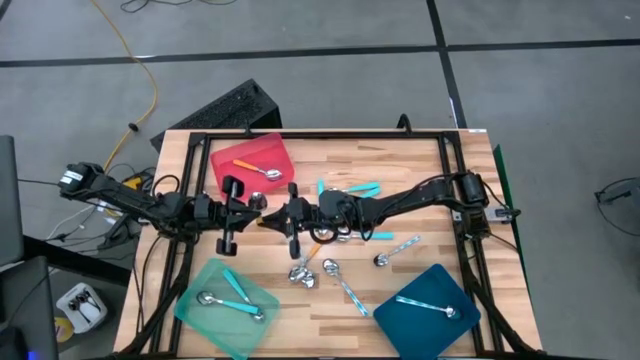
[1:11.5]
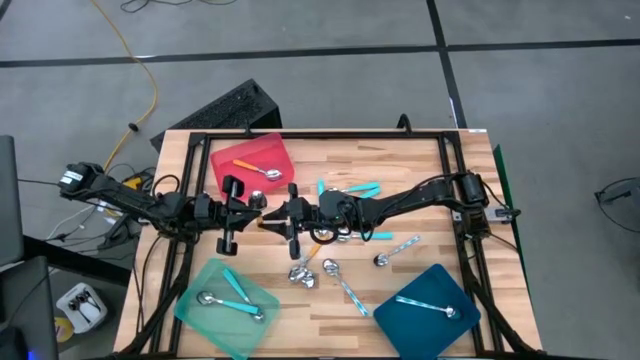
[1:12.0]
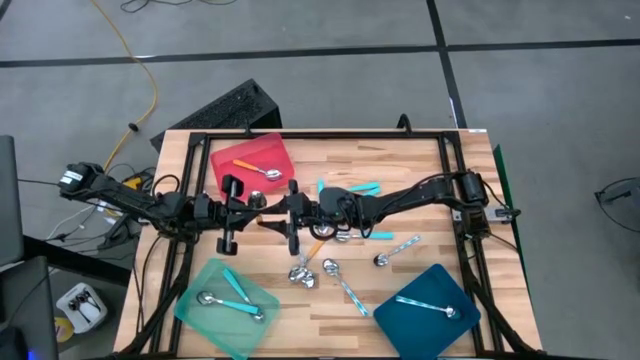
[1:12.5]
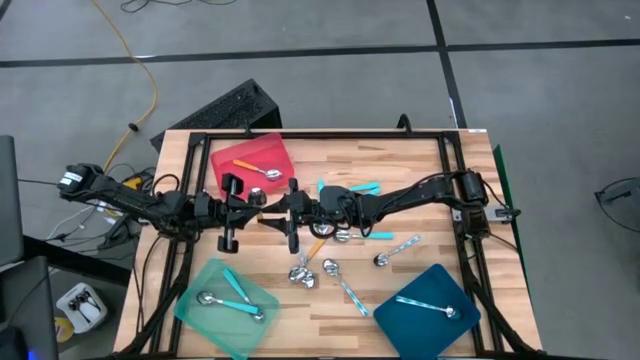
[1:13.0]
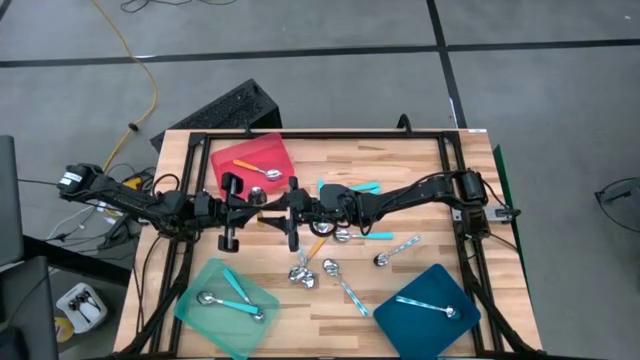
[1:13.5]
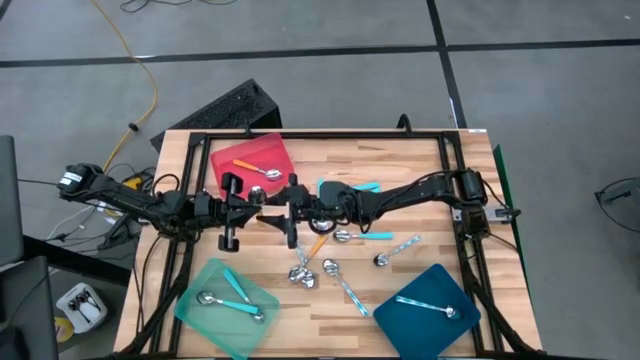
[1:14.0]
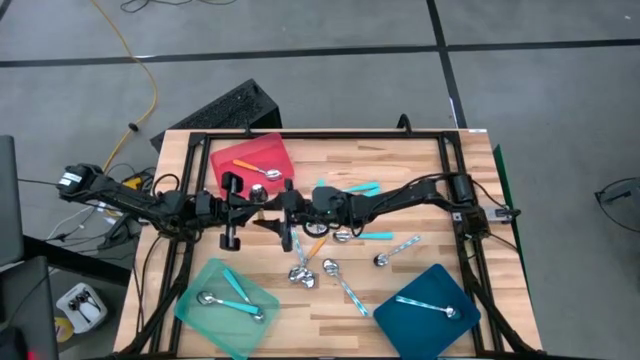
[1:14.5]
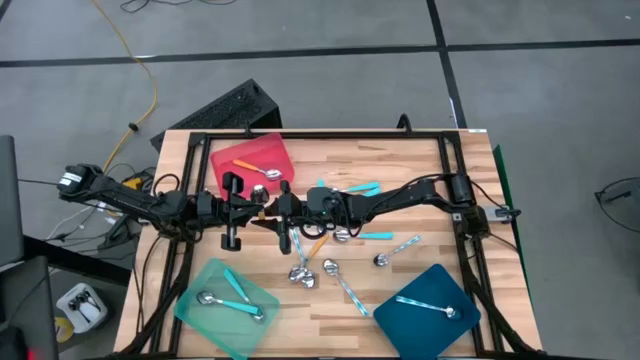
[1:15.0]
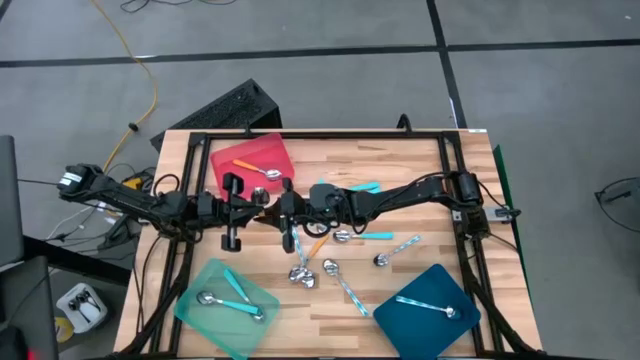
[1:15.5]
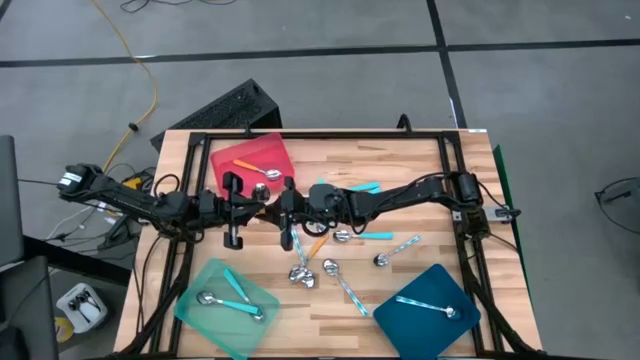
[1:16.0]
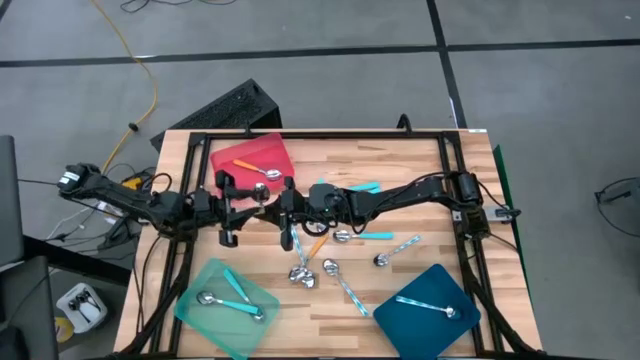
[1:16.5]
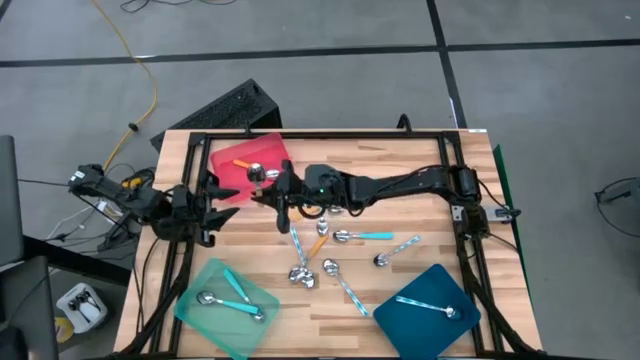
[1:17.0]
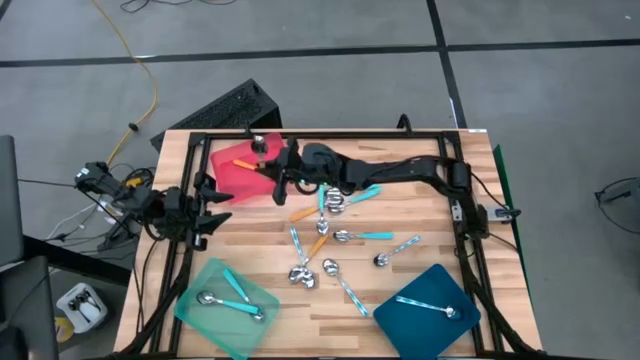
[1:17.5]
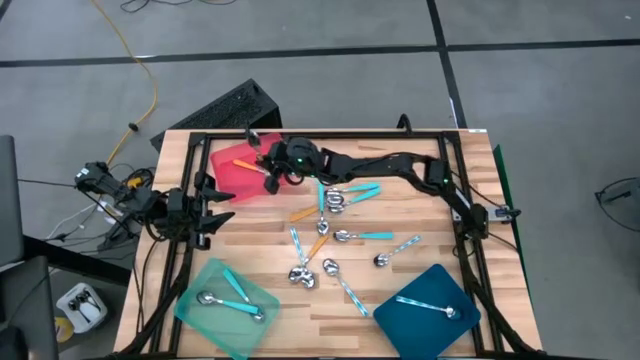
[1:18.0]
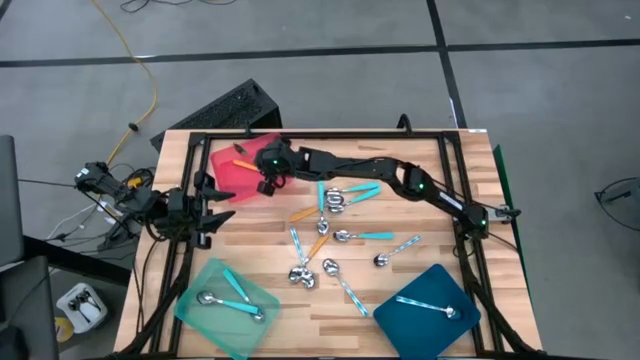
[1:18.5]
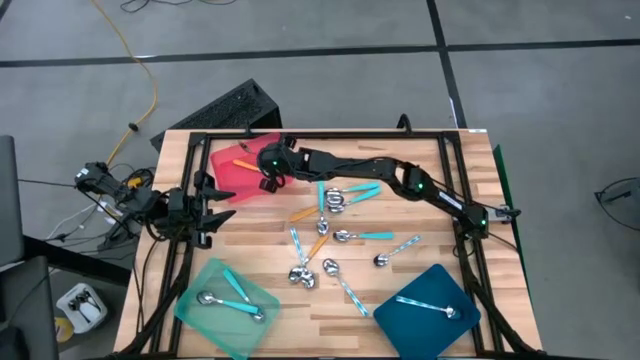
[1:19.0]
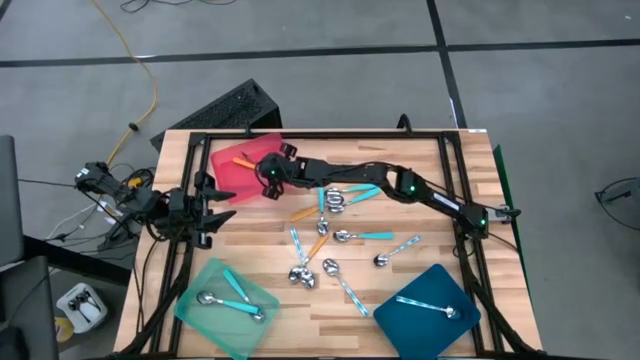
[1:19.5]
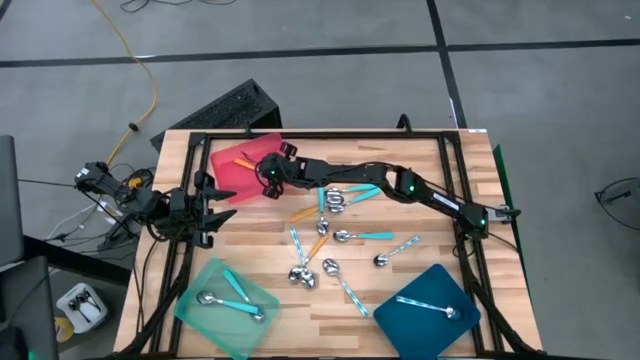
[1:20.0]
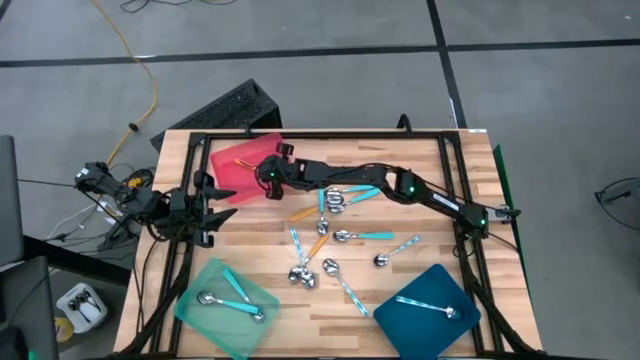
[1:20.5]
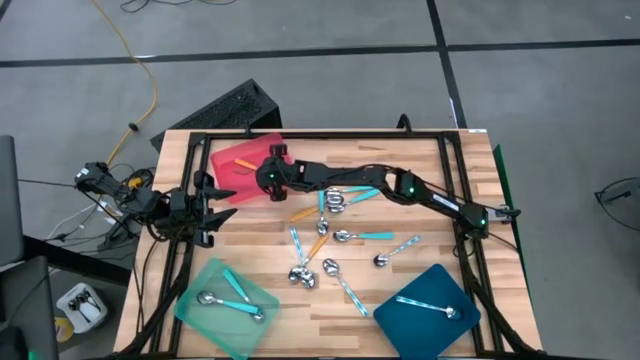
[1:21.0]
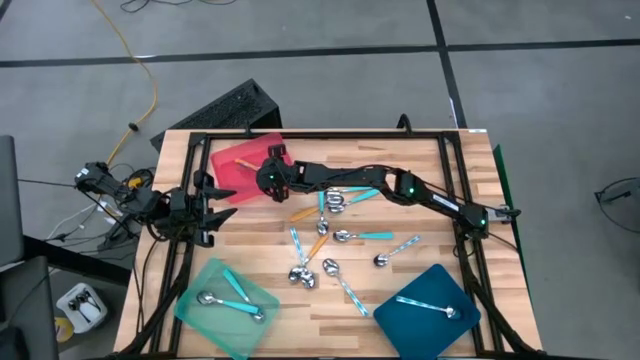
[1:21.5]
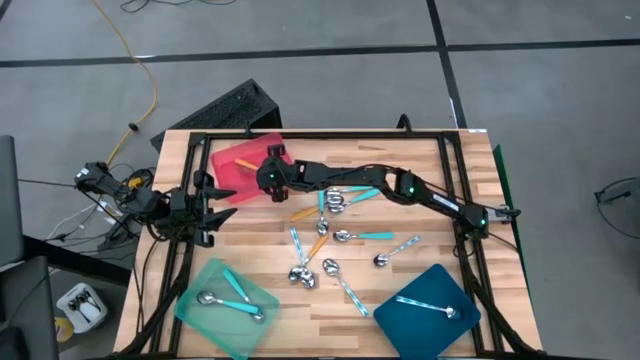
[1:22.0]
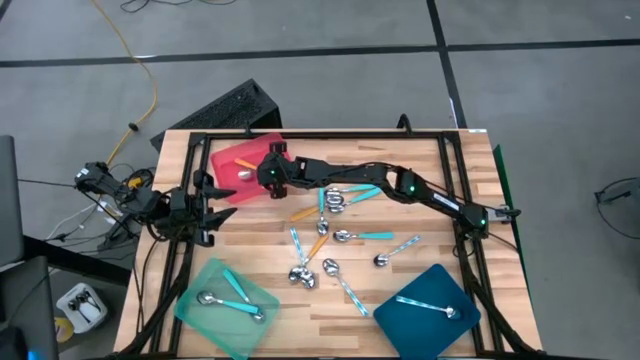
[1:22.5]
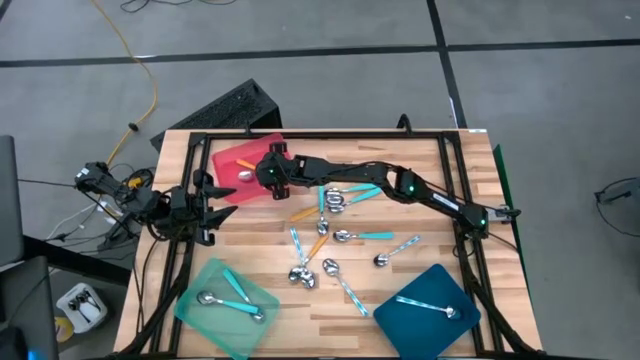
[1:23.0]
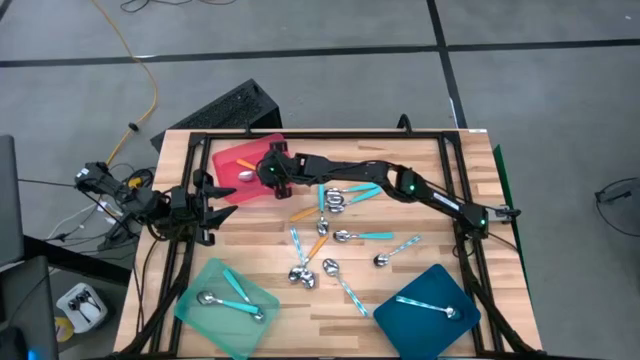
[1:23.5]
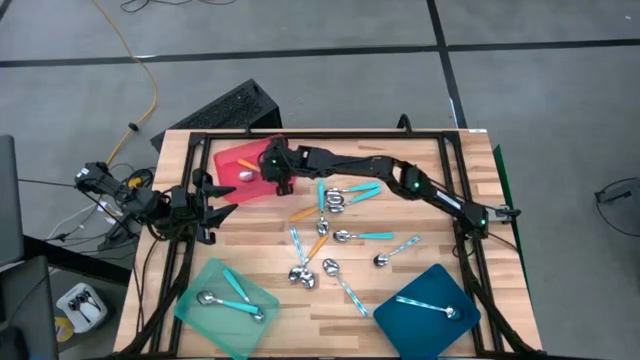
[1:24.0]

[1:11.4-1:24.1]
Task: Sort silverware by color (type)
Put the yellow spoon into the pink bin

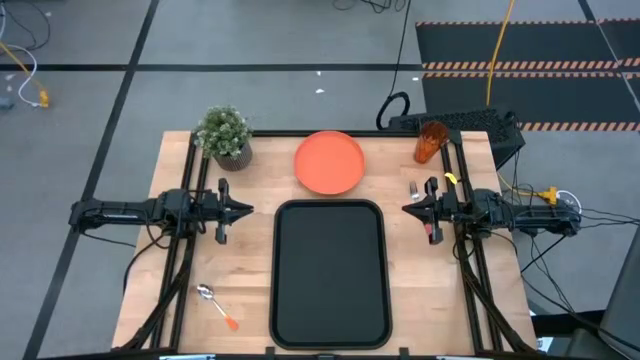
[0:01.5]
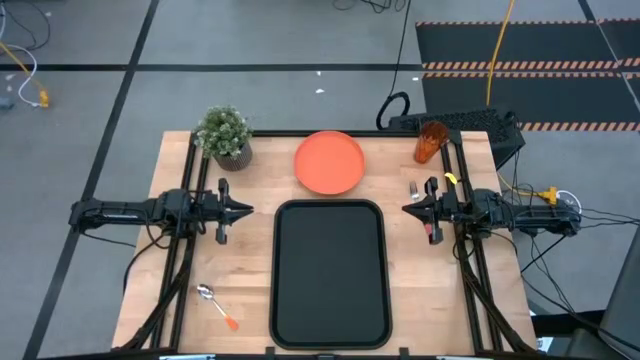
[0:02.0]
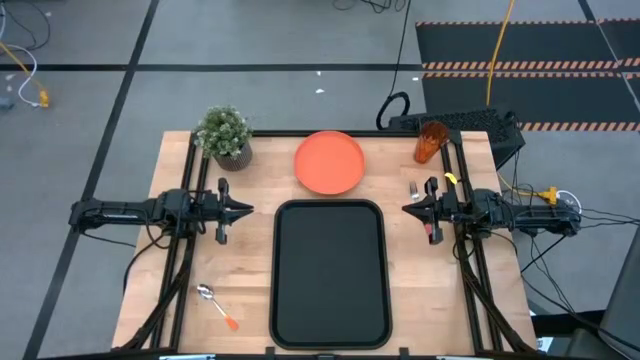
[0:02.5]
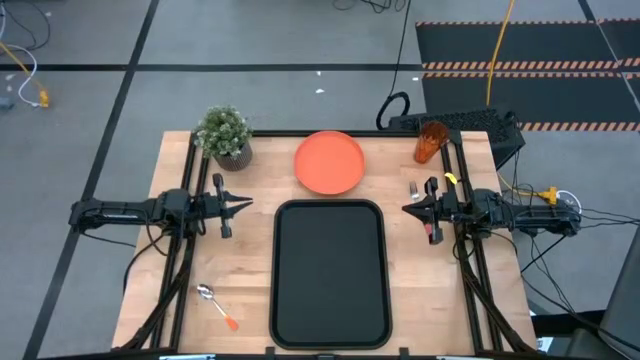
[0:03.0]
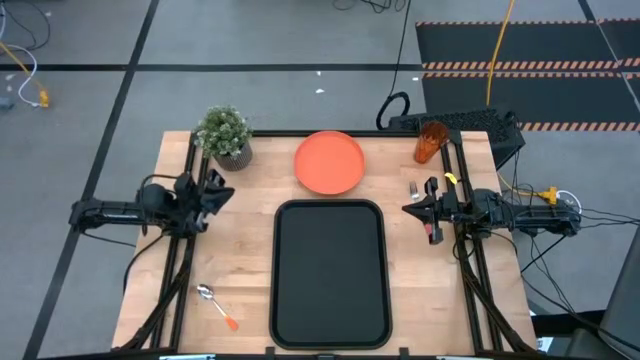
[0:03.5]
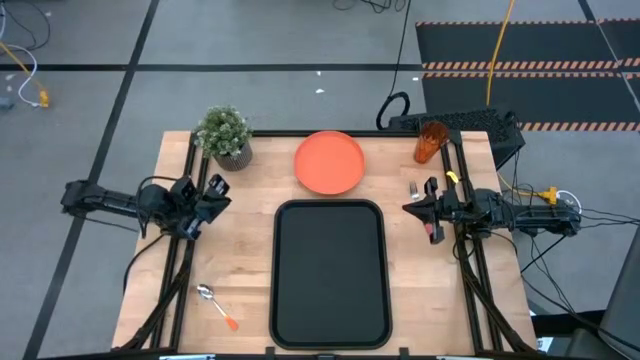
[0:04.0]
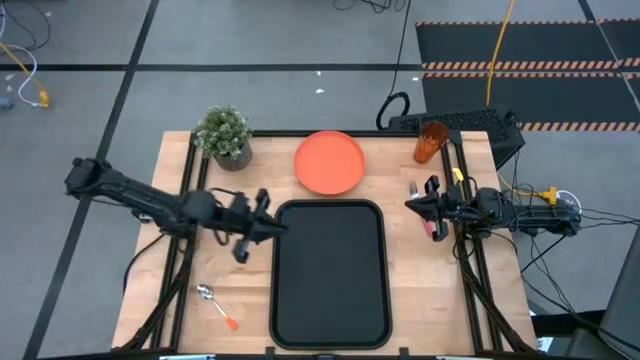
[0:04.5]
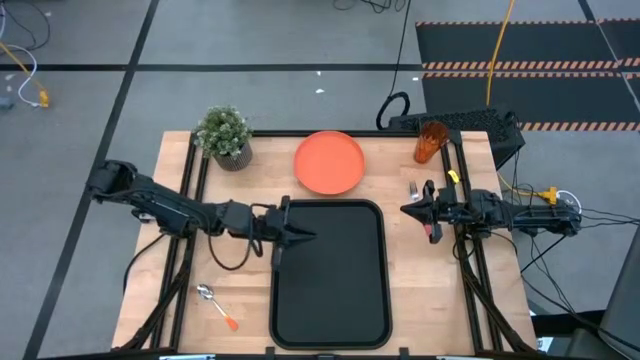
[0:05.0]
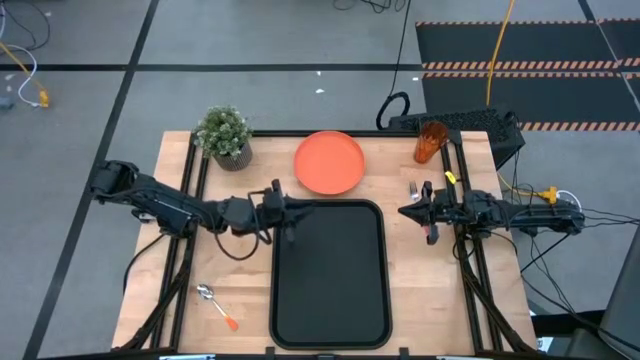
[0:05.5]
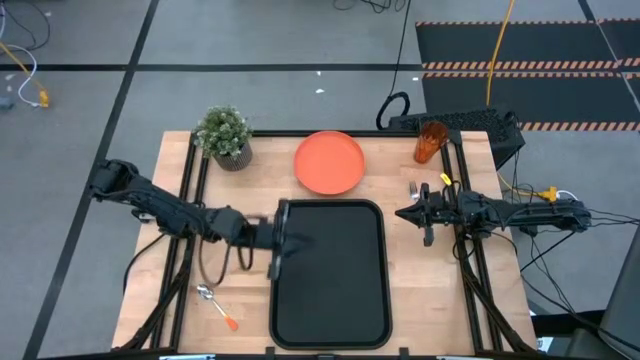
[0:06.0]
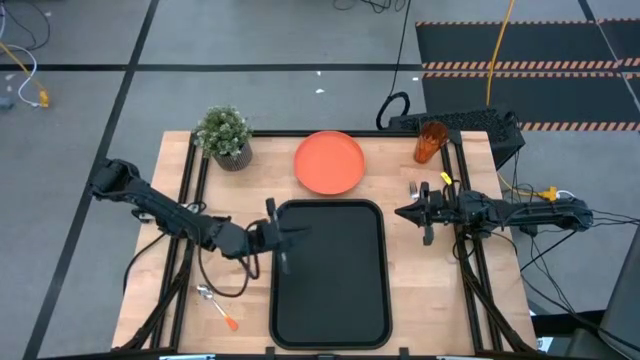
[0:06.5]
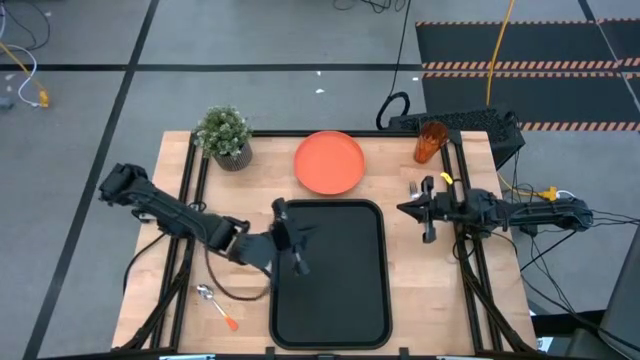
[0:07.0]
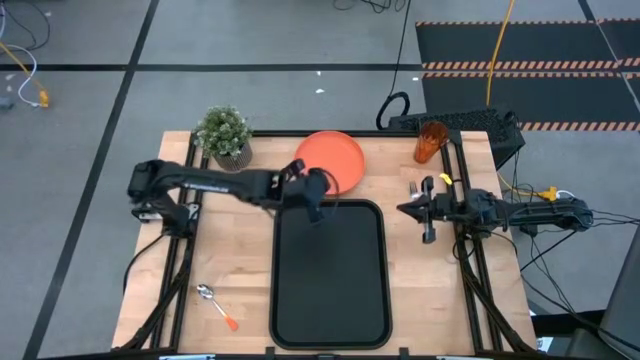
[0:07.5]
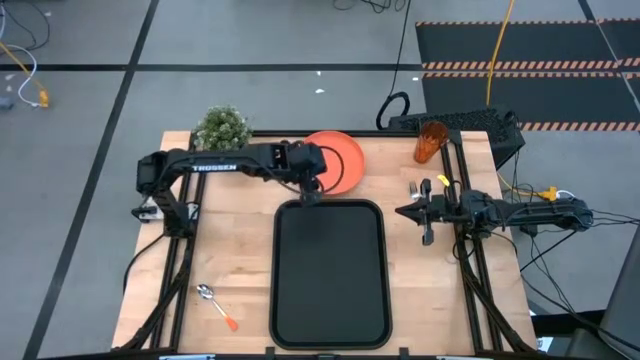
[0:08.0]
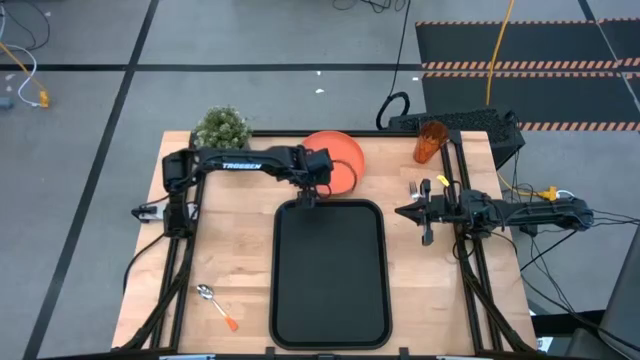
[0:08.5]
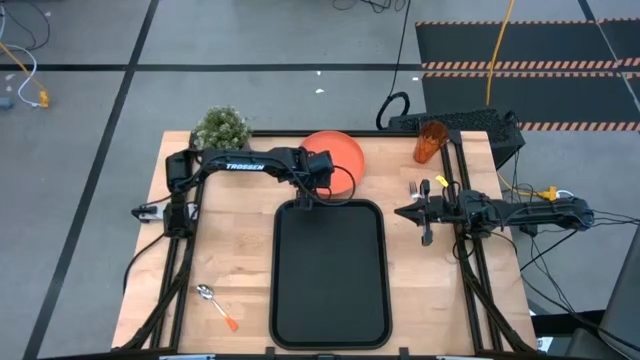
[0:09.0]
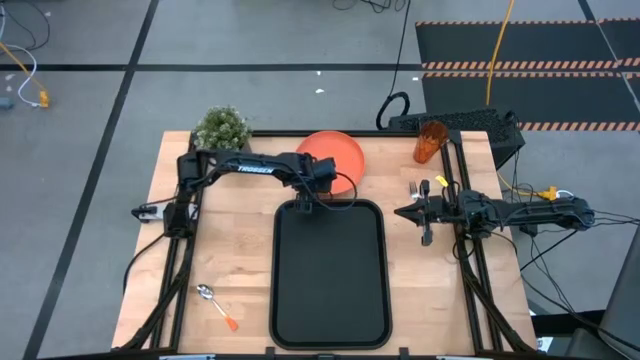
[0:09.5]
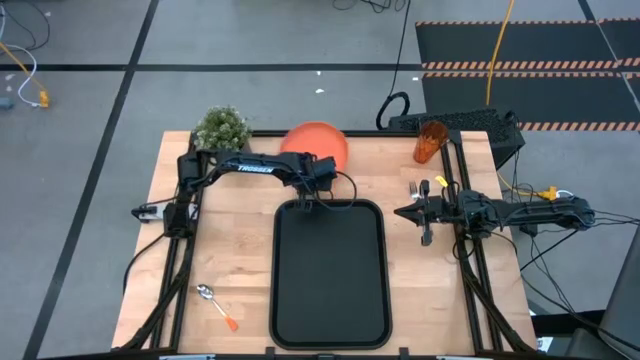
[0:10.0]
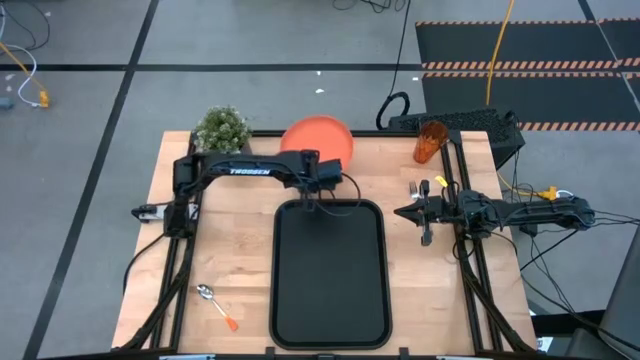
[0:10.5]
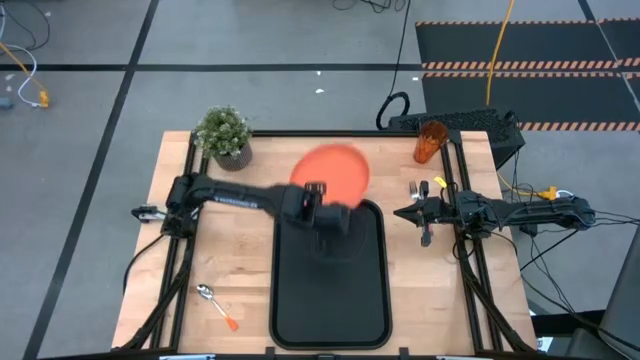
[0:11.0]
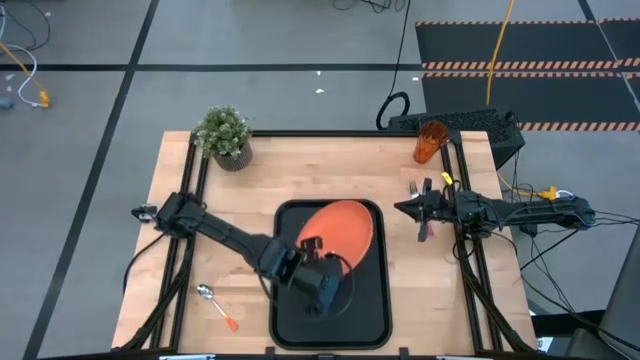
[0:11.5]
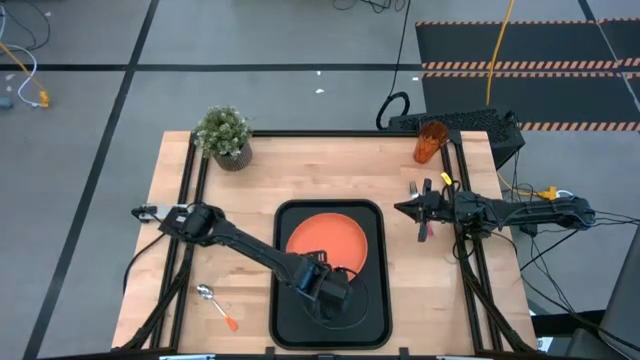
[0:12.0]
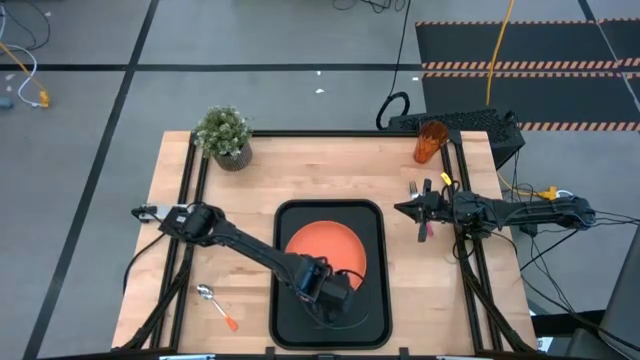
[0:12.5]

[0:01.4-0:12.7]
Task: Pick and place plate/cup/fork/spoon on tray
Put the orange plate on the black tray
